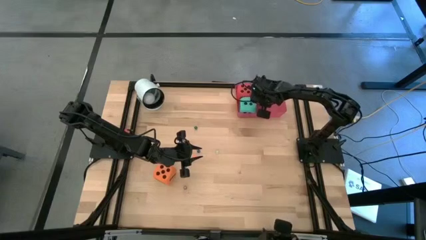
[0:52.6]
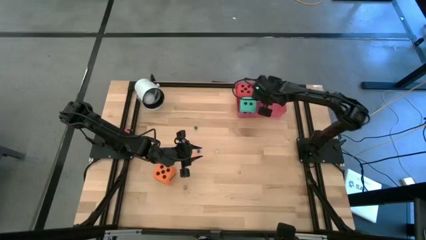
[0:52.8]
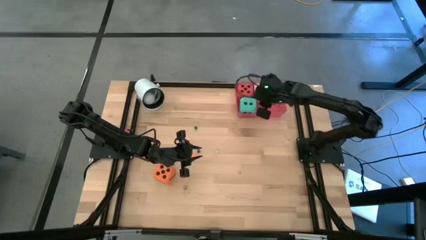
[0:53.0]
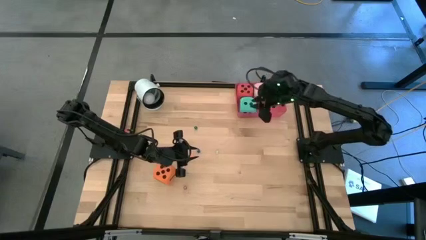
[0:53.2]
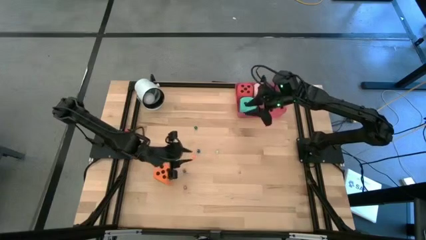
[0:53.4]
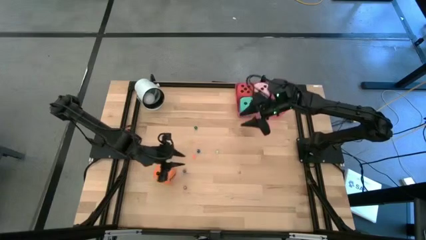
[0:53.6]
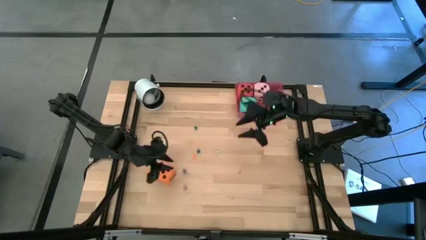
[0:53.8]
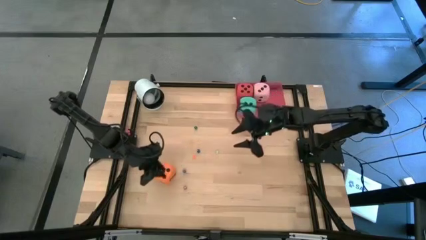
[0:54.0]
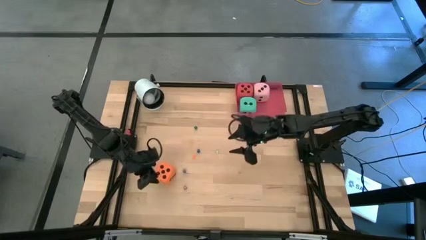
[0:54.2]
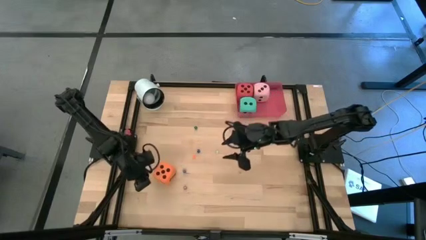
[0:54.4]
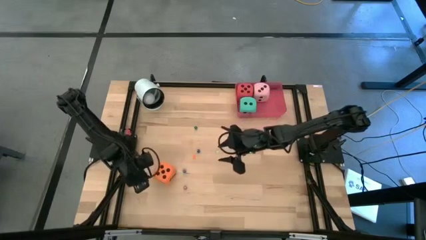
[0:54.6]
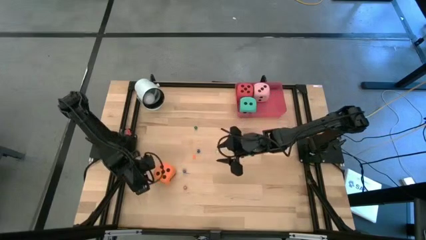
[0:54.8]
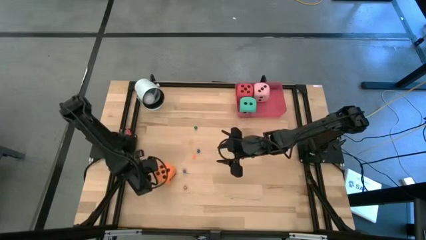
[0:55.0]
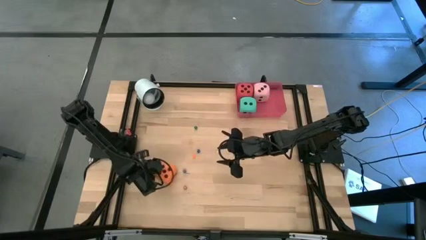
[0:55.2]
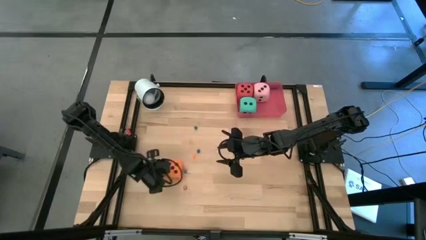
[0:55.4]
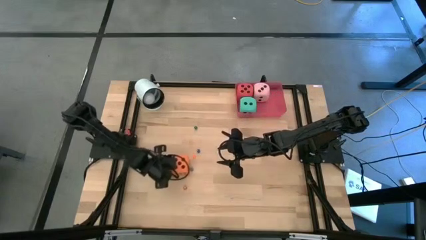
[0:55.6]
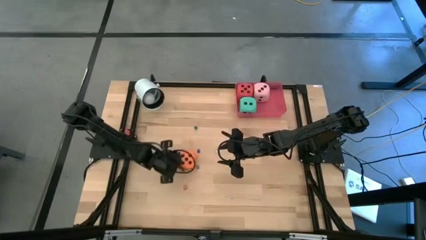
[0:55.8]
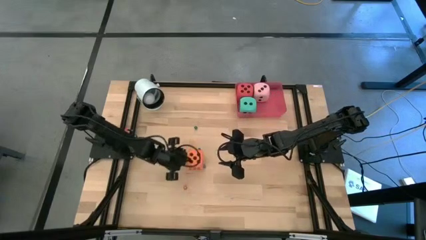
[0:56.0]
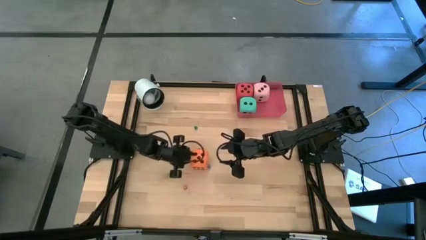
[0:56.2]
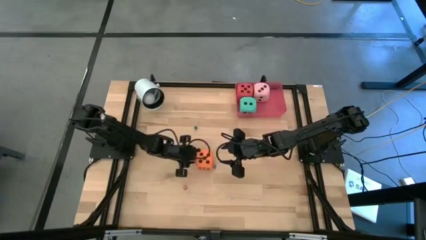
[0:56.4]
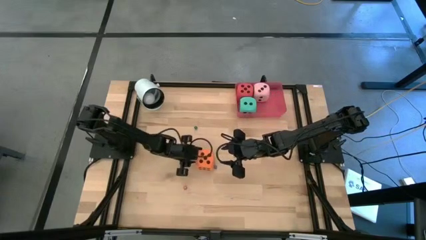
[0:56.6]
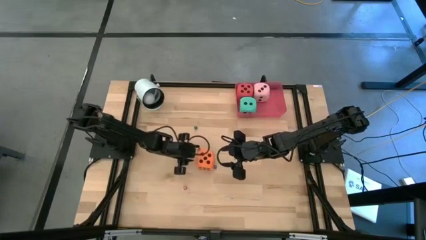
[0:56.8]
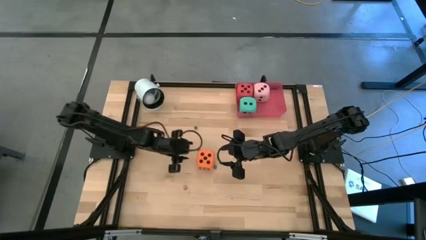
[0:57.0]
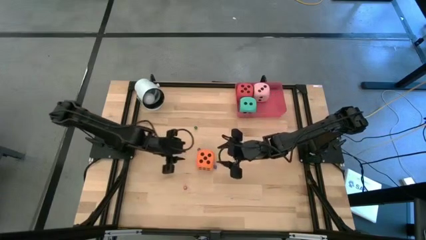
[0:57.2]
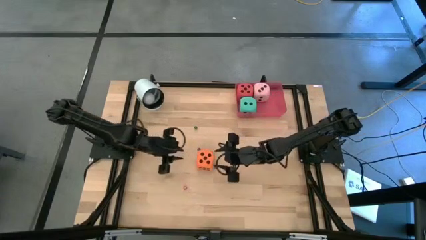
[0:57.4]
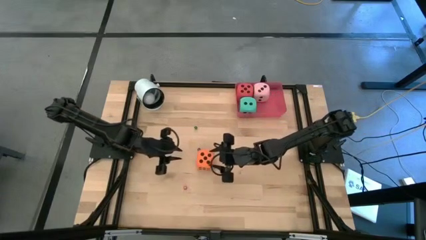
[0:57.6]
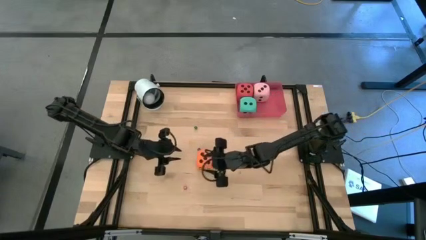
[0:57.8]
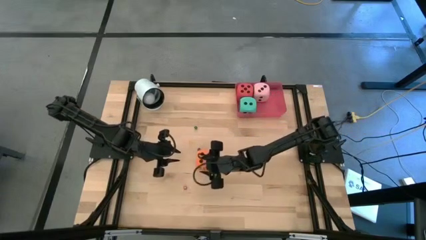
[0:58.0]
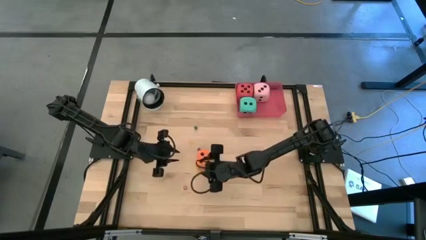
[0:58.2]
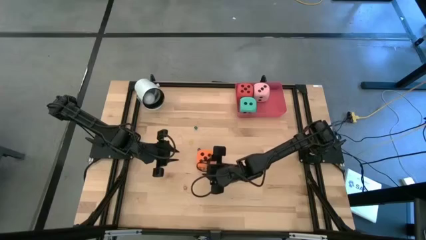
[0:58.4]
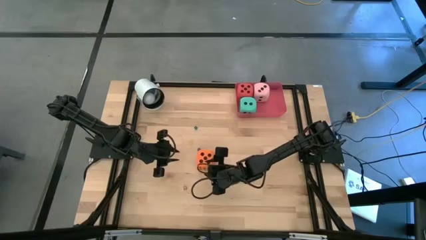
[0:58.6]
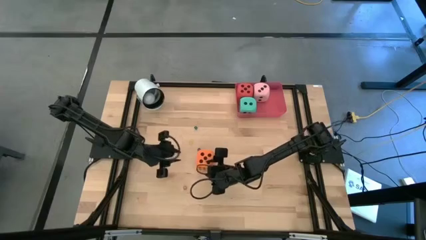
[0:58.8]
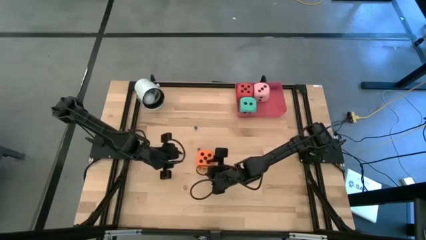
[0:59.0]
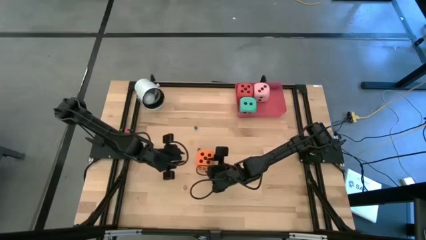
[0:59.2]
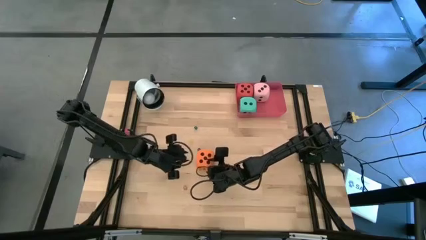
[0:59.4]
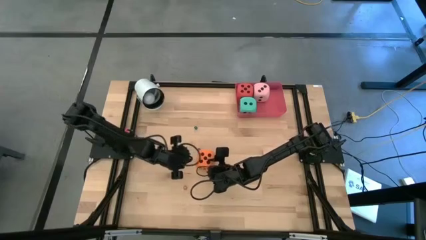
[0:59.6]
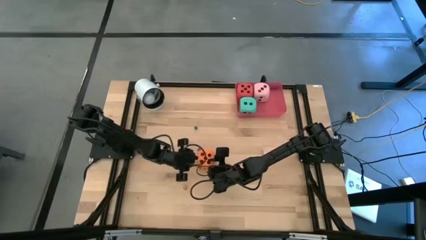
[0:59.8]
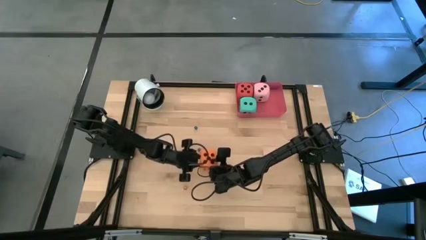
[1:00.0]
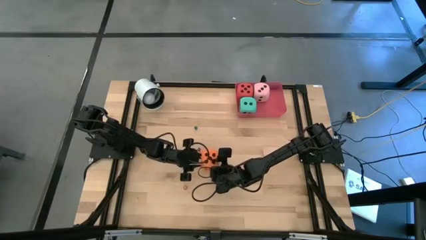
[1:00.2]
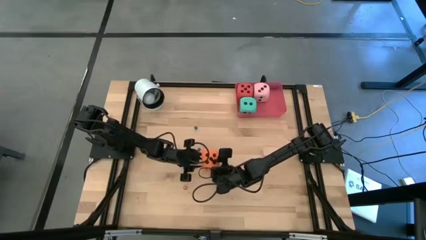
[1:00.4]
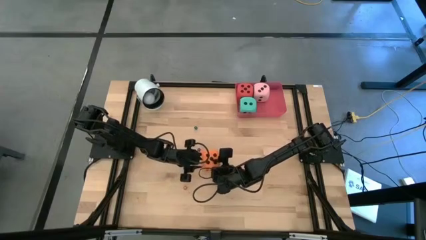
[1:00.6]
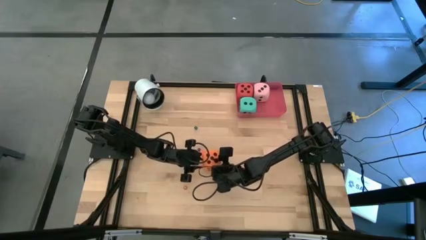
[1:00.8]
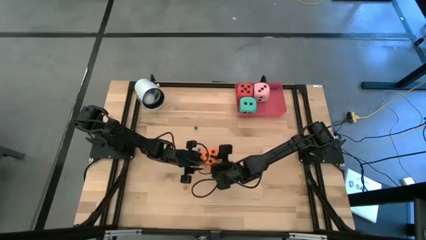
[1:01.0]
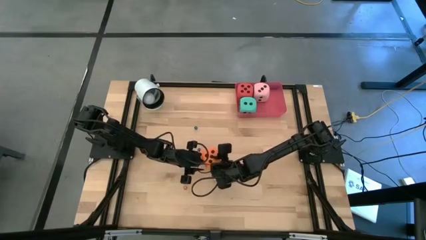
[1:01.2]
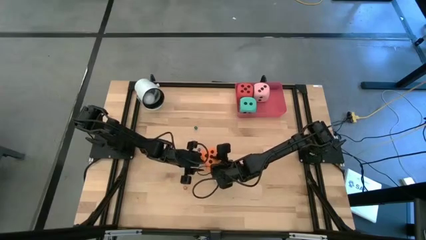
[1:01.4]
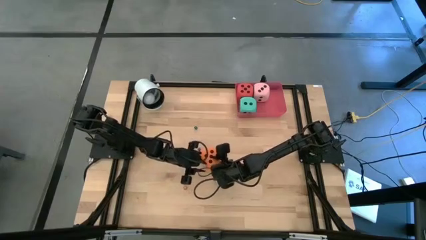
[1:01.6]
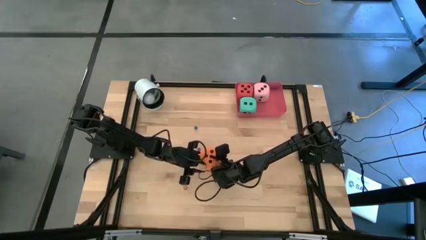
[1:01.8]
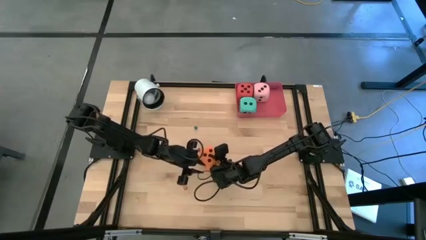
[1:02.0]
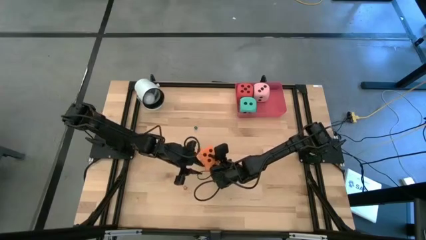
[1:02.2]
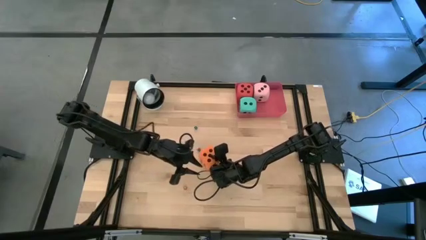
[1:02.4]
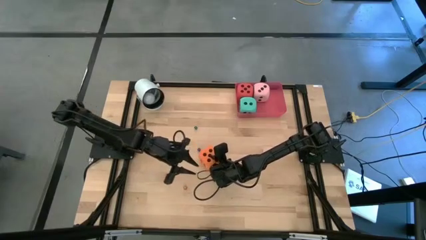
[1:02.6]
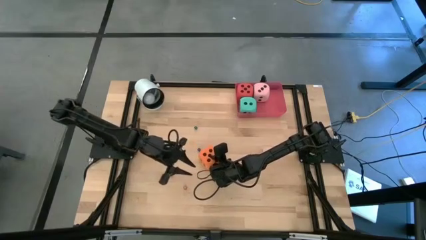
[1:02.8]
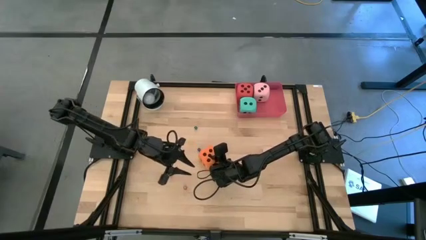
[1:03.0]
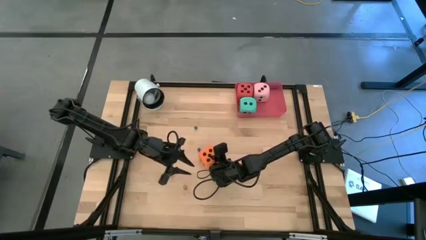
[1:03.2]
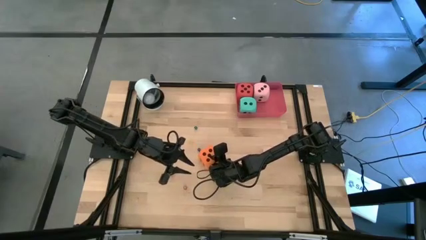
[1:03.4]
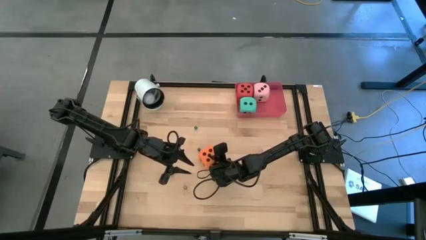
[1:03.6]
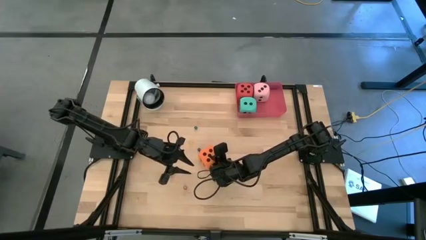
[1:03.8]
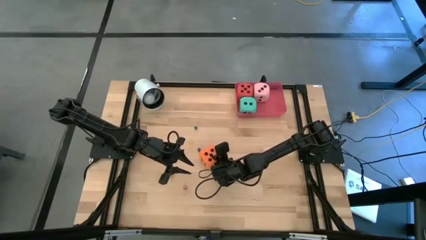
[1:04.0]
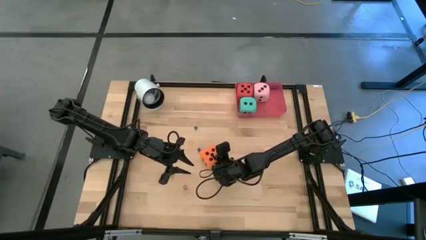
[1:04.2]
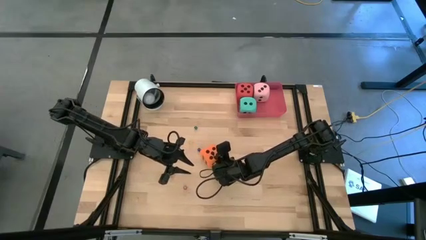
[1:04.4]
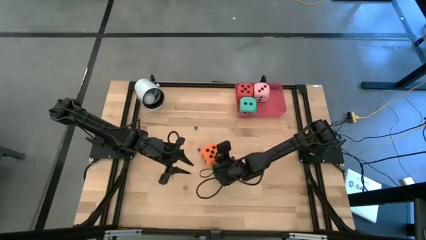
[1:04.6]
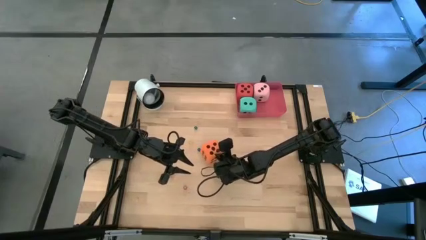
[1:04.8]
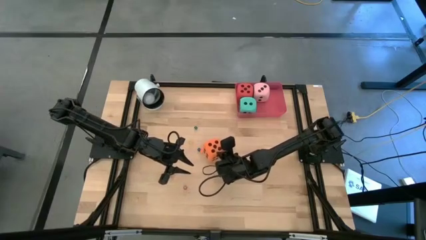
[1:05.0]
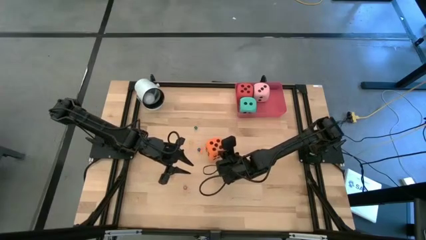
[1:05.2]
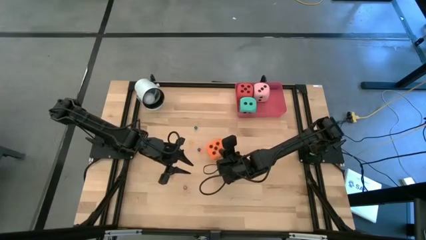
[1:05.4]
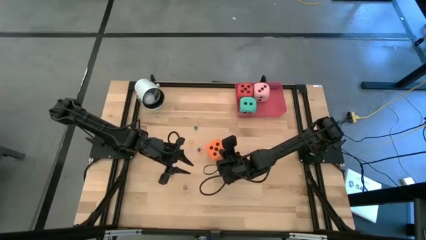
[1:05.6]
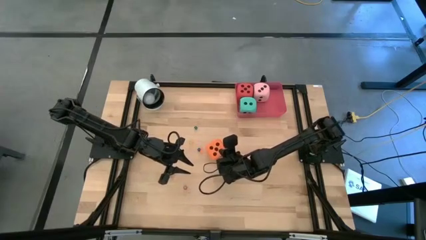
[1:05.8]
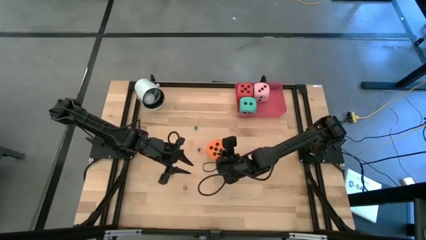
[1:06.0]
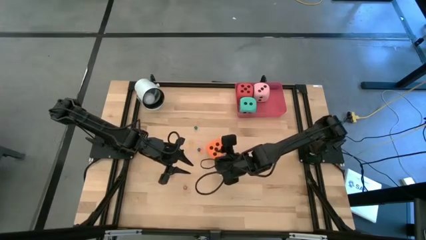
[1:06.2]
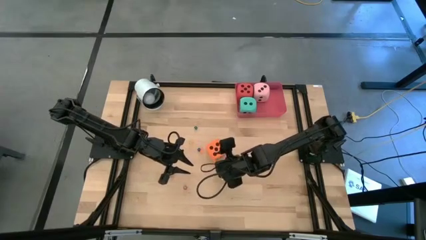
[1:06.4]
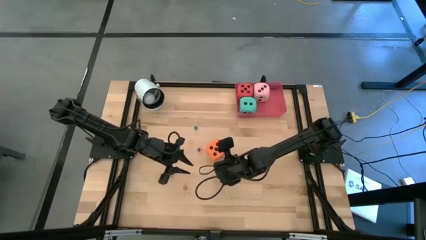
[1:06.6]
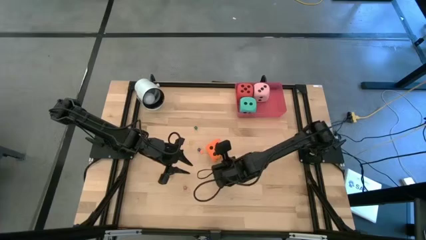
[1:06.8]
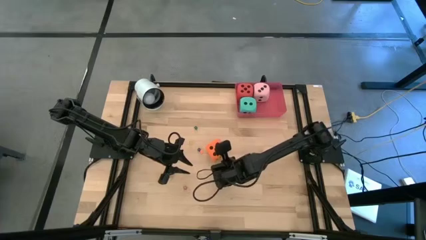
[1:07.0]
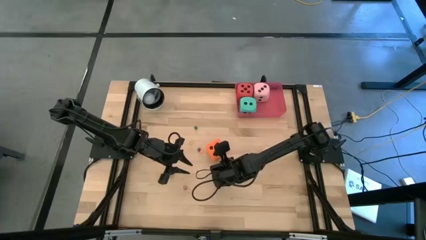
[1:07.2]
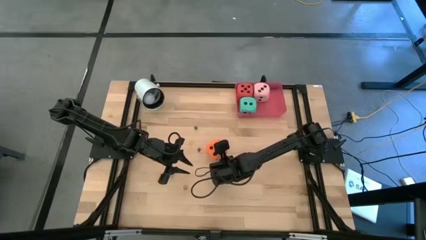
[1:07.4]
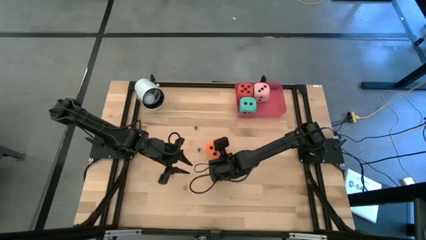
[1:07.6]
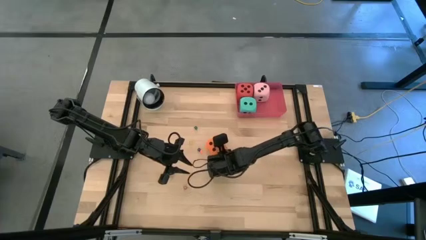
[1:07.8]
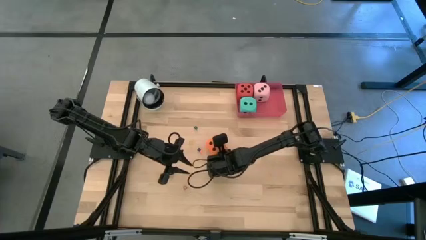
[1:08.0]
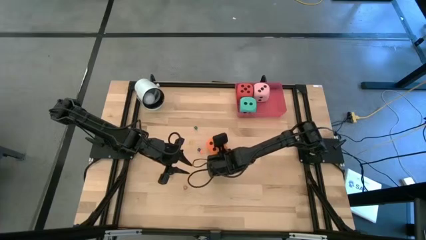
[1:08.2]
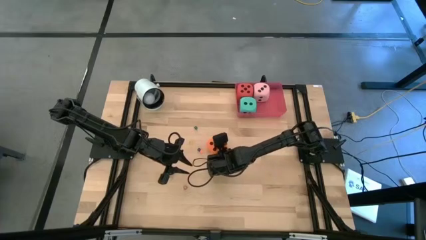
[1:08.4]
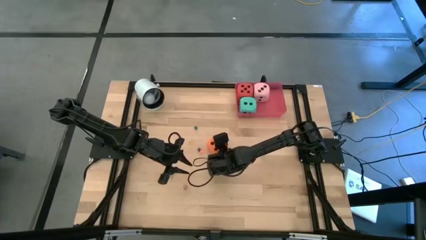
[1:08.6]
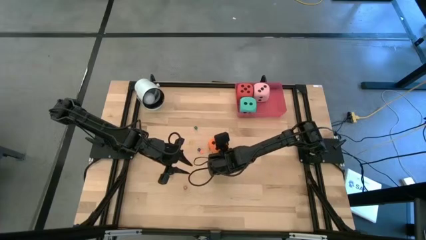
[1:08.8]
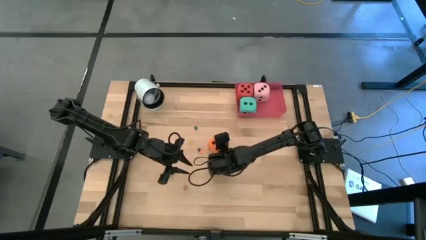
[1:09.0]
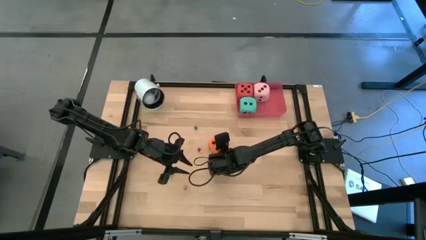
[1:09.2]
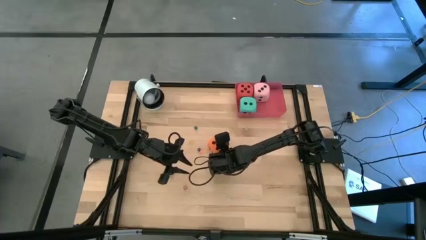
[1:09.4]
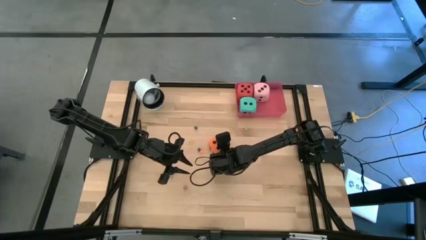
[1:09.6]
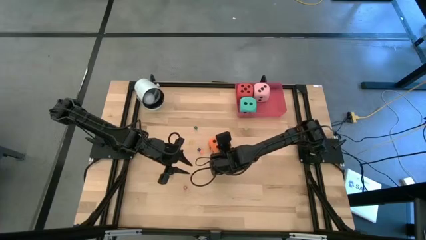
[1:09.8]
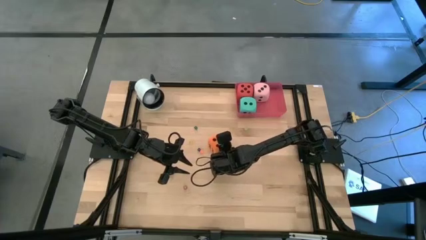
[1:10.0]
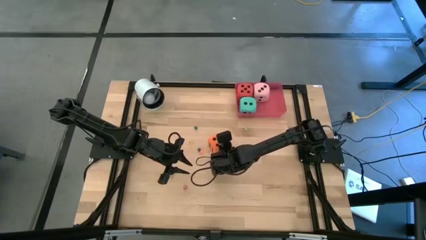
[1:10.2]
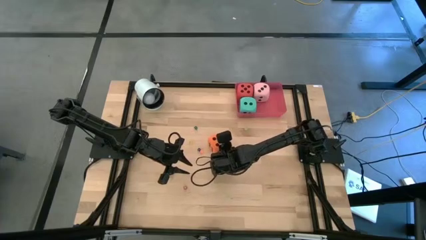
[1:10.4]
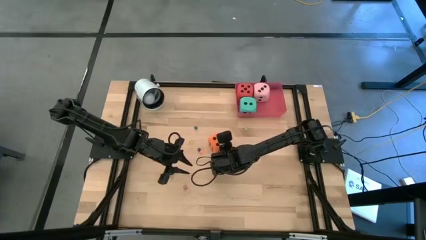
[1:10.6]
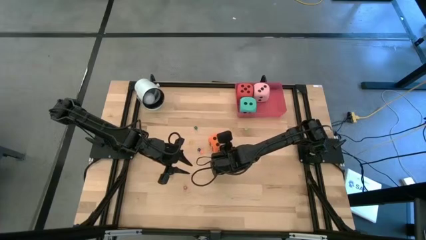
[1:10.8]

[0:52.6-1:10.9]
Task: Pick & Place Dice
Put the large orange dice into the red bin
